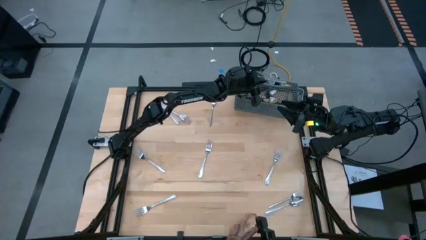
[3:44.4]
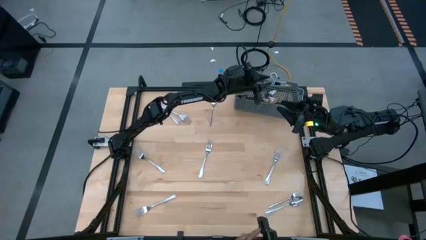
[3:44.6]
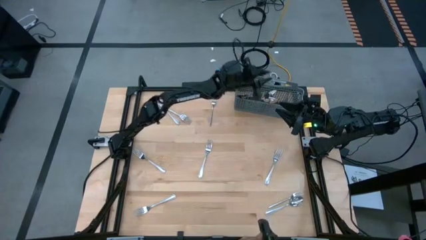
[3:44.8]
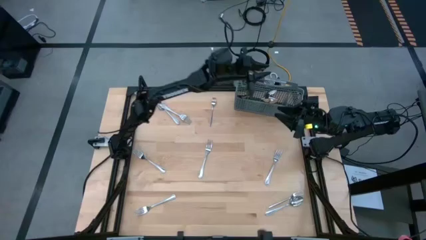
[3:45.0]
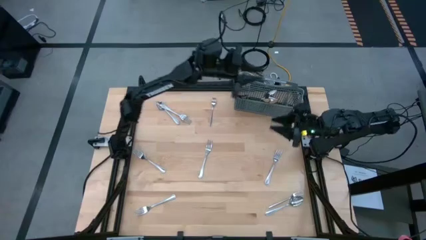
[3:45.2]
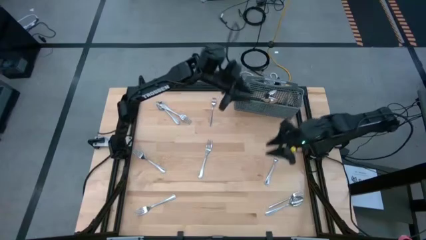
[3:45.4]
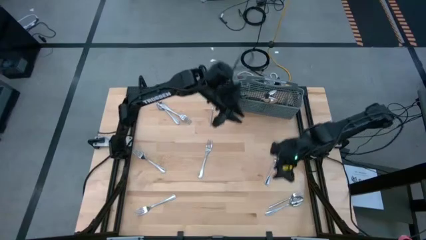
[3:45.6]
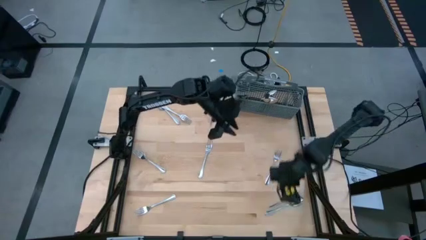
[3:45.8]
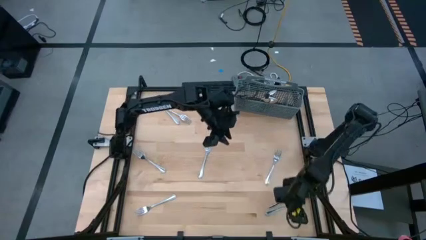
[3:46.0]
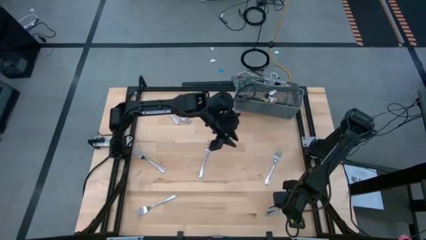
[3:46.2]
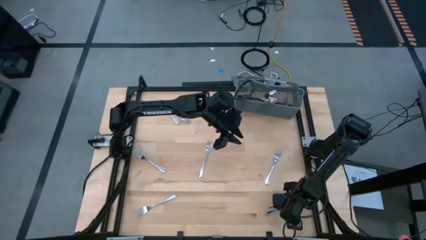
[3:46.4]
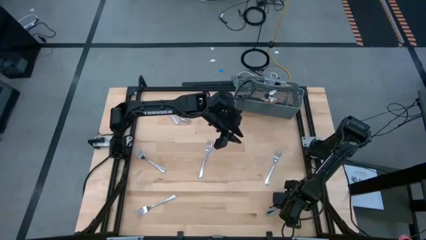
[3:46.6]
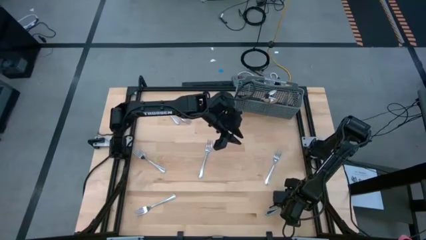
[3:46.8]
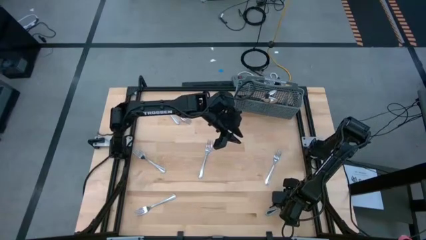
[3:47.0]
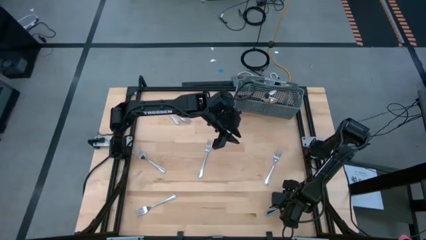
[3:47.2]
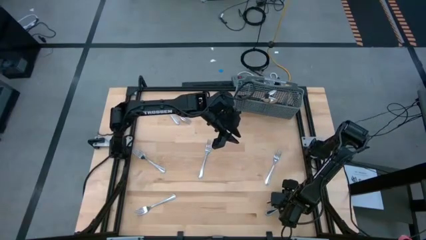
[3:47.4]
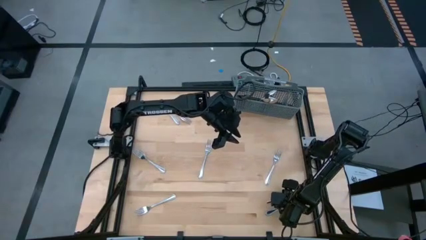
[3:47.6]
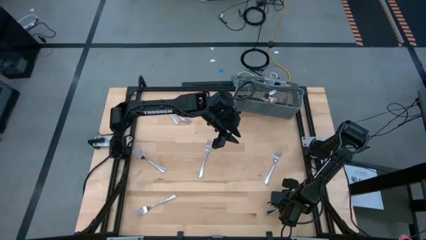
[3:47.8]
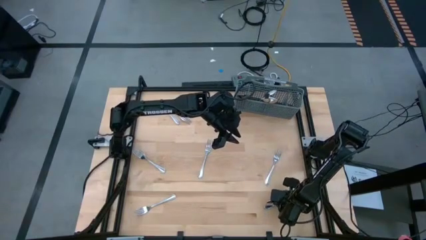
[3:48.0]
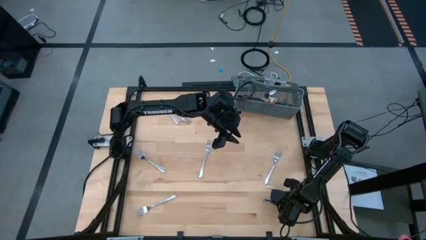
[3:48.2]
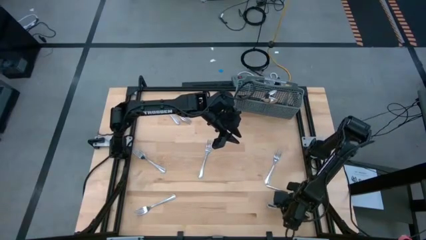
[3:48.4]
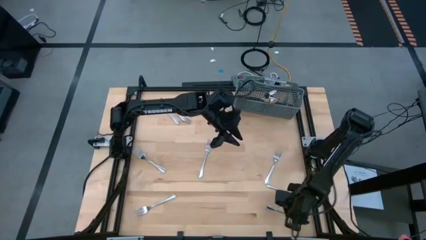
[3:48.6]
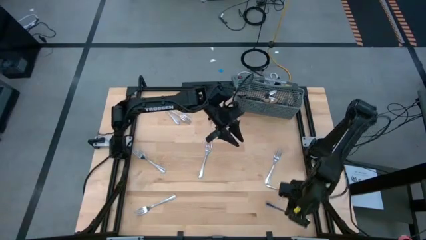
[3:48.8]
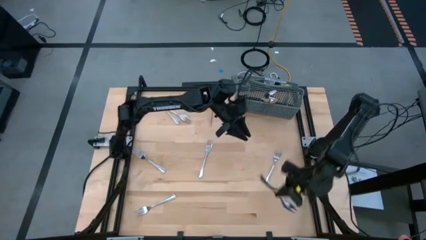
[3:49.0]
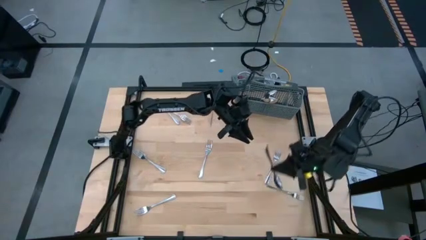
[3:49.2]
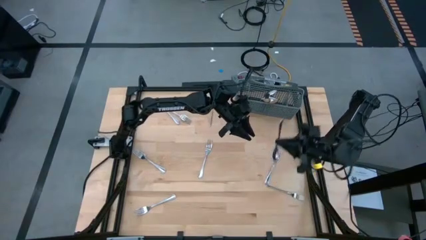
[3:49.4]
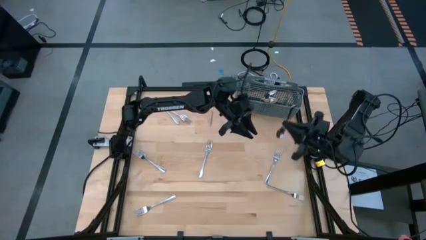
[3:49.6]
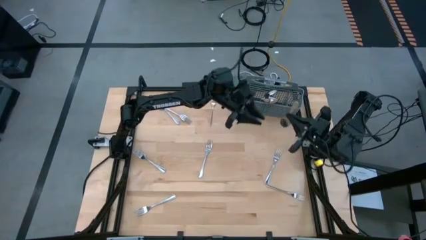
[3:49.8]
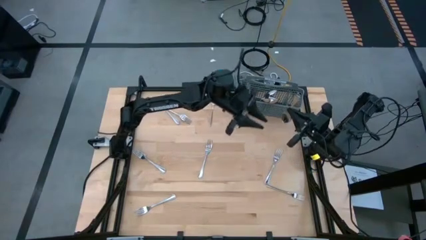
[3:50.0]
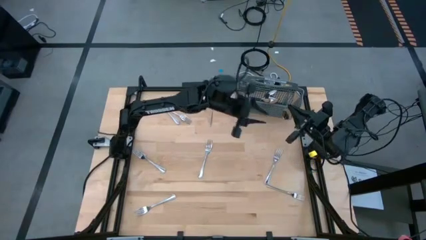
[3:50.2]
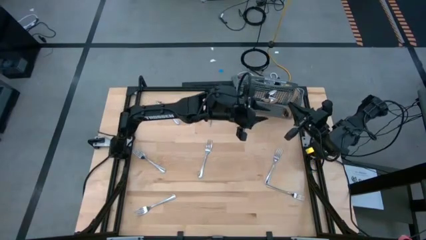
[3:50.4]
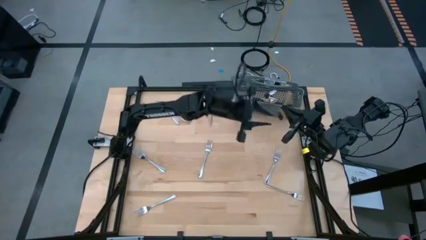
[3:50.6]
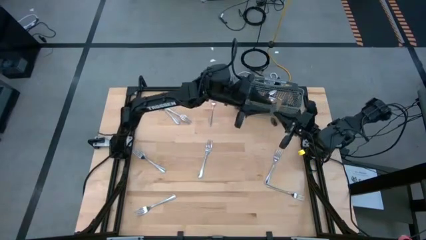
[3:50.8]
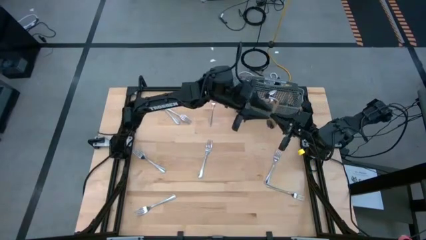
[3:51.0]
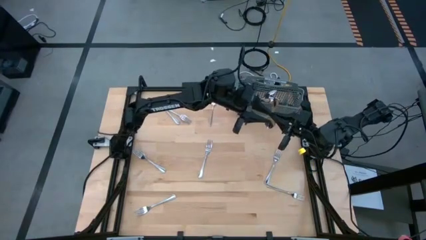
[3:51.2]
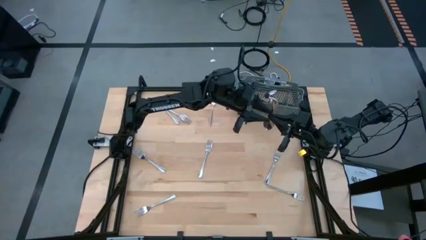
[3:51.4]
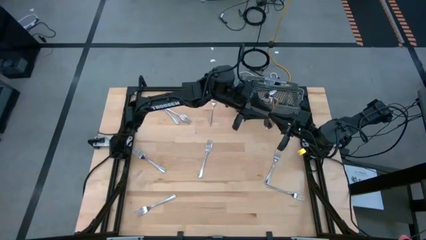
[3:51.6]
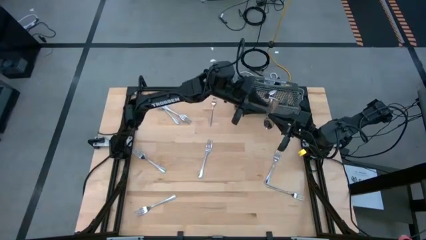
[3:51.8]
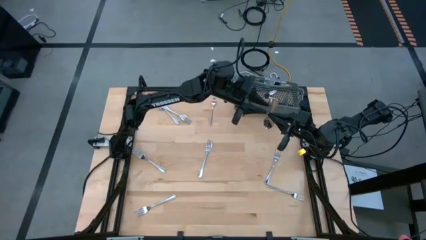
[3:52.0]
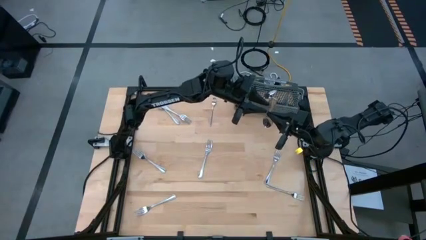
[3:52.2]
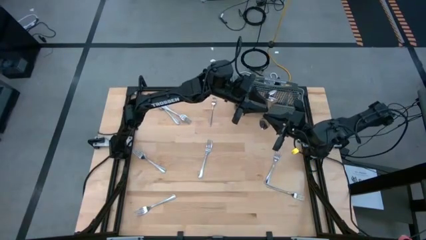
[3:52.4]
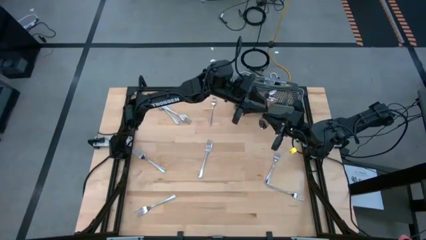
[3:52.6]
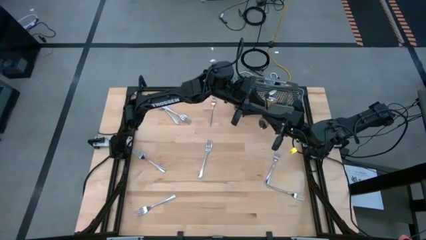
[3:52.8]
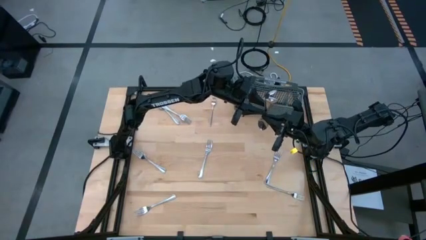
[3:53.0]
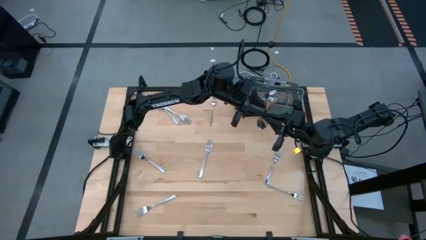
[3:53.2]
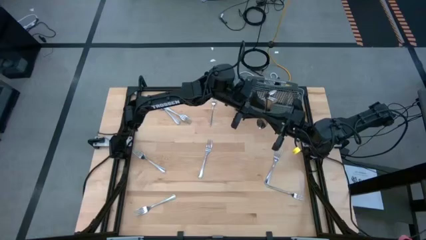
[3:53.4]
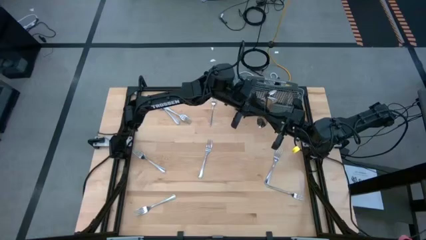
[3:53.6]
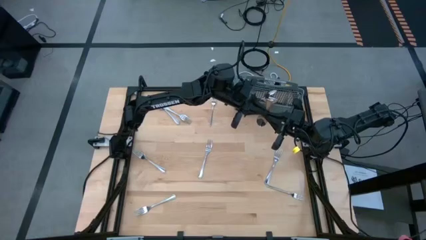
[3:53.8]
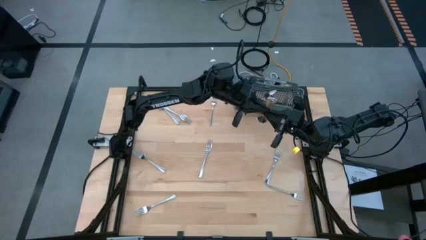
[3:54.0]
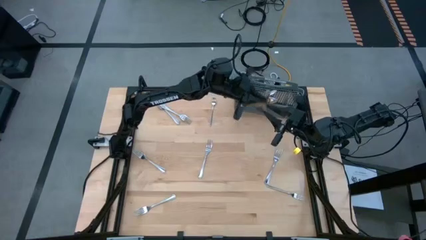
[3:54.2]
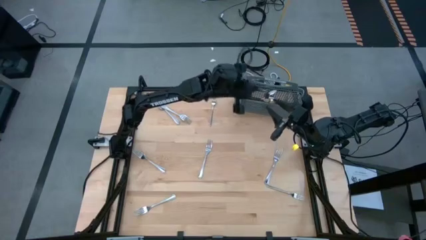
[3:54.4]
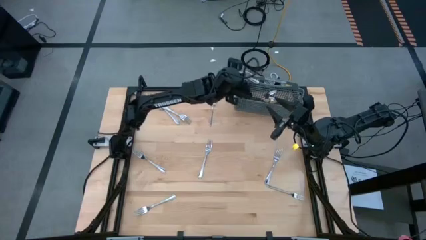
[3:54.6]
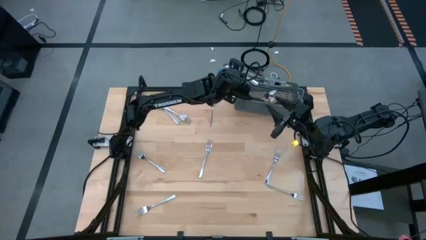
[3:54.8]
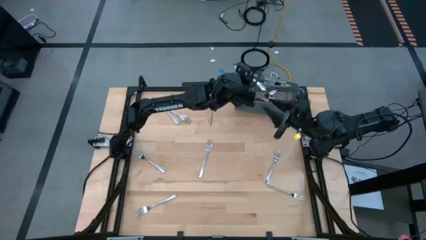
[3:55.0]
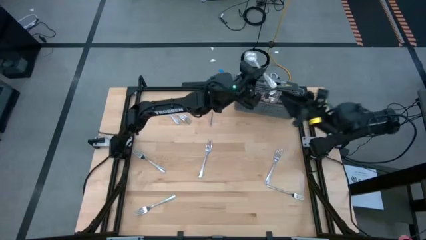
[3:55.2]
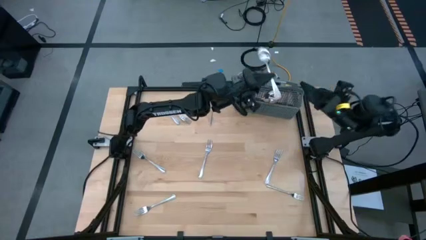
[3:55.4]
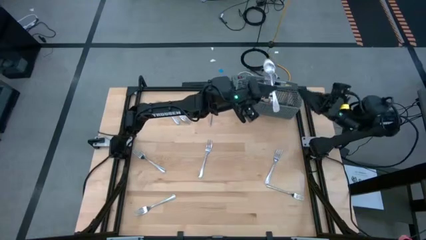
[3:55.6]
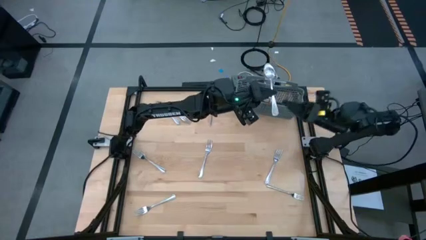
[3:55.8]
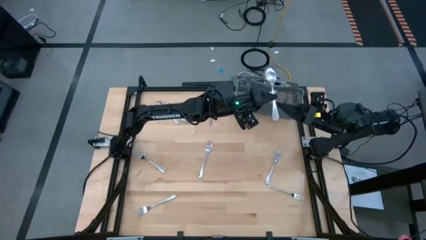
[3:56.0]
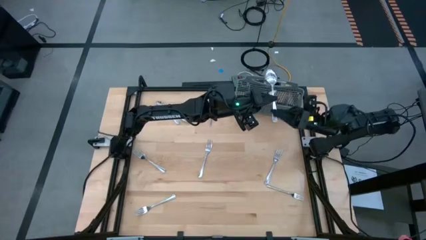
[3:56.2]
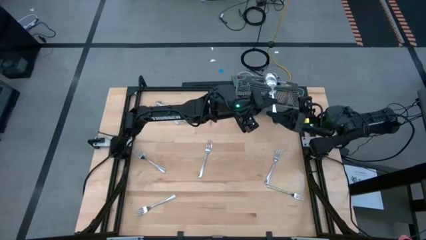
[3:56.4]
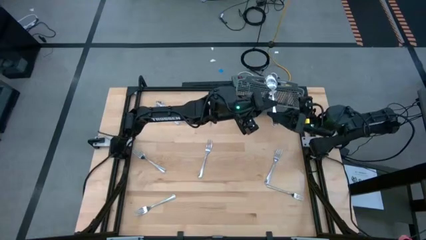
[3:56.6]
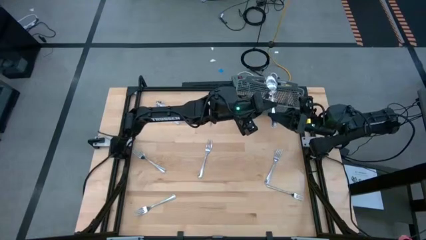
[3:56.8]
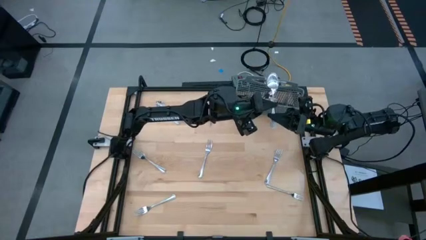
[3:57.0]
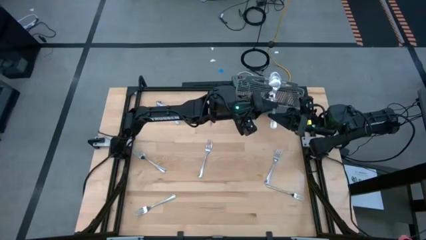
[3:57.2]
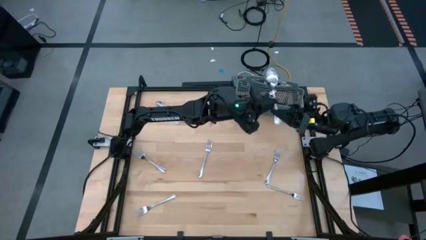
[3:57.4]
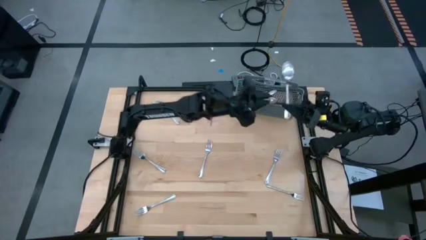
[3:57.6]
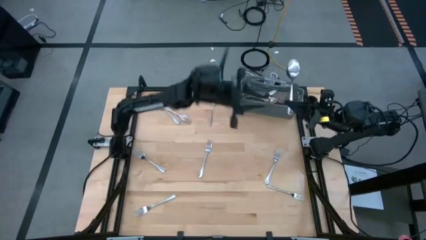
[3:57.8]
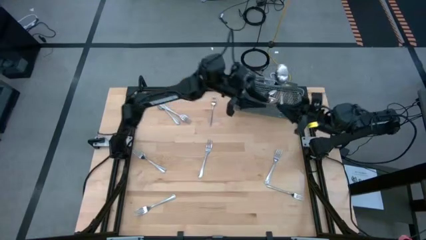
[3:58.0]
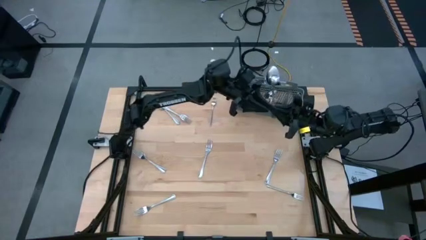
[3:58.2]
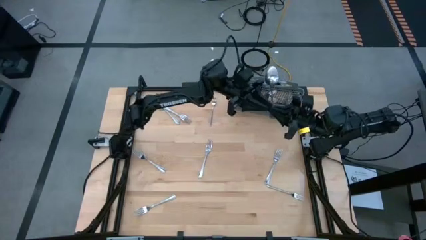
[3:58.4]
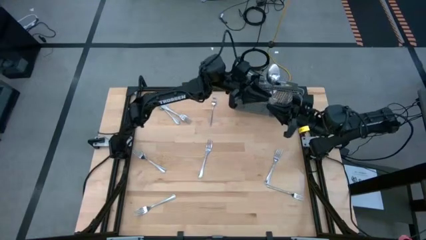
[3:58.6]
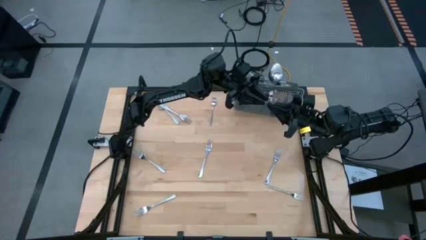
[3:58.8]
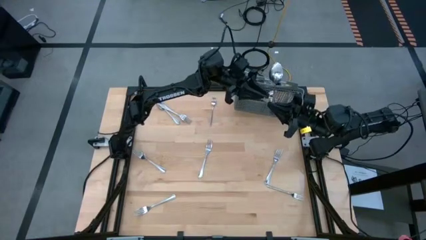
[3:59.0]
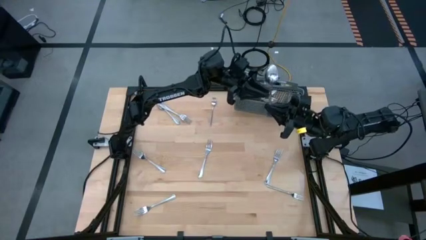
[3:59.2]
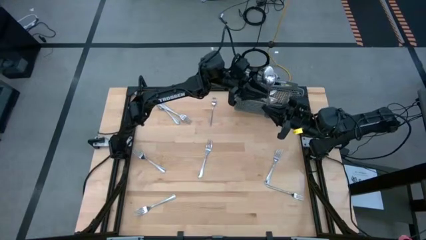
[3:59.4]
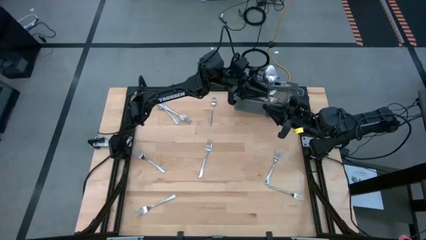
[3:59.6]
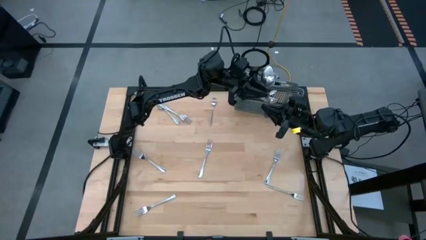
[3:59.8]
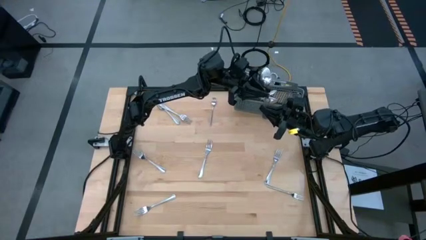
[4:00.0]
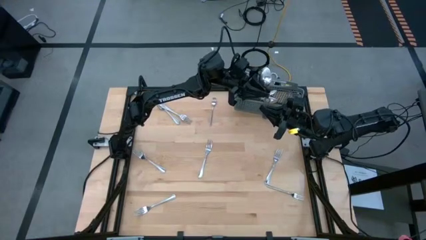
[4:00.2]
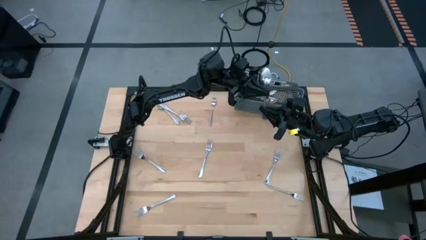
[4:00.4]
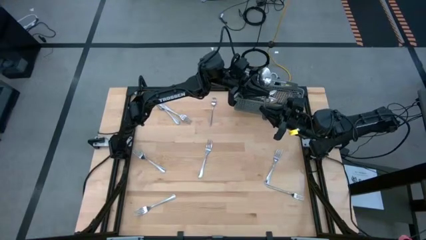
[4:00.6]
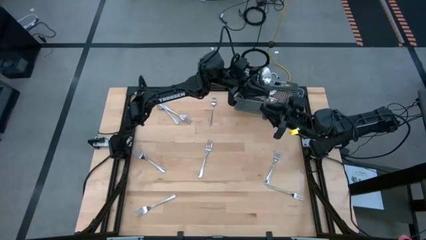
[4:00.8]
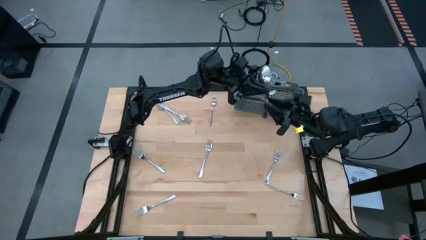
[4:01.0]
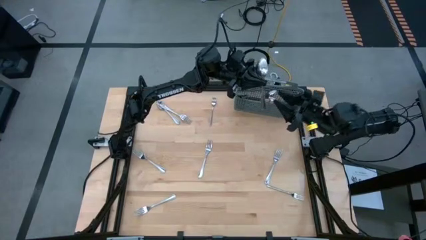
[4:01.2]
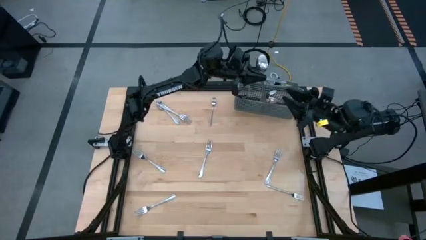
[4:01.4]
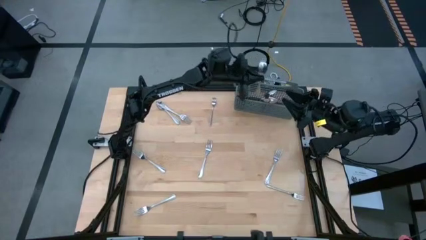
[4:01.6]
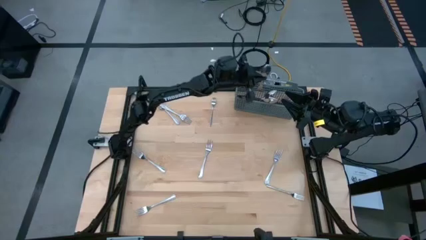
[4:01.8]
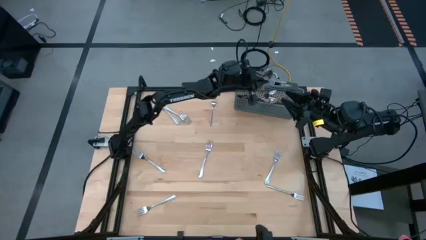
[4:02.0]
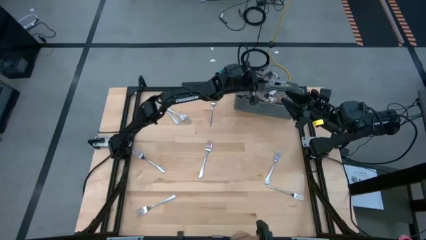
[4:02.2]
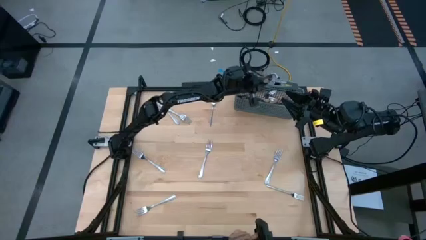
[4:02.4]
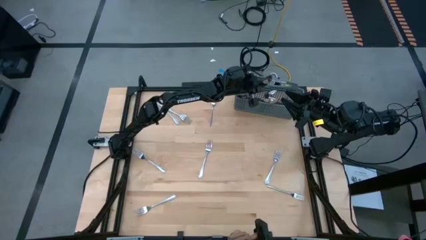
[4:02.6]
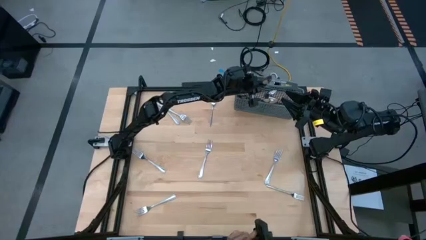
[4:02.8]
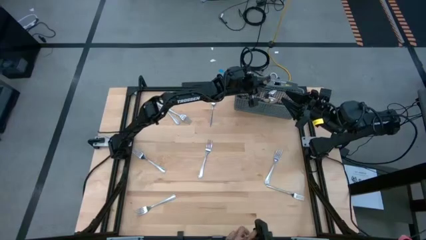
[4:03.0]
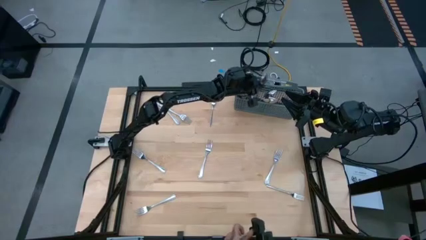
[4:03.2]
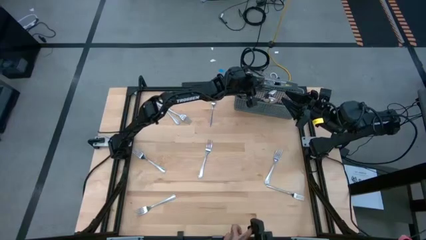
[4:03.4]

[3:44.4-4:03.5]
Task: Sort silverware
Put the silver spoon into the silverware basket
